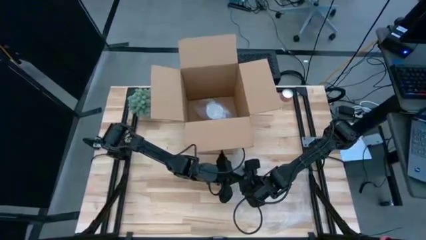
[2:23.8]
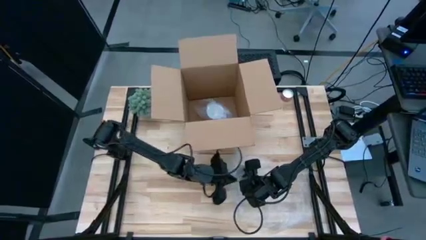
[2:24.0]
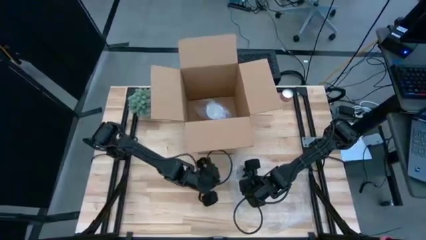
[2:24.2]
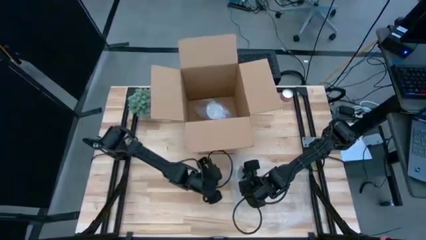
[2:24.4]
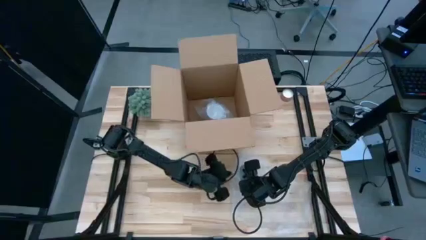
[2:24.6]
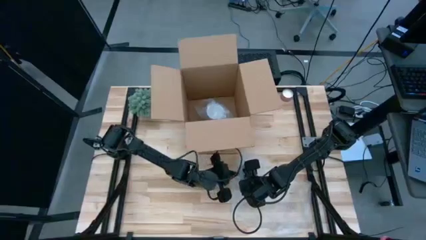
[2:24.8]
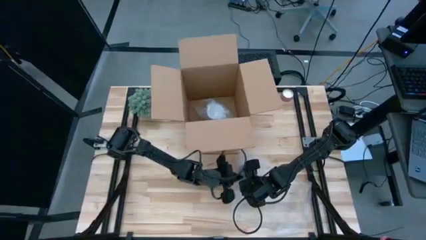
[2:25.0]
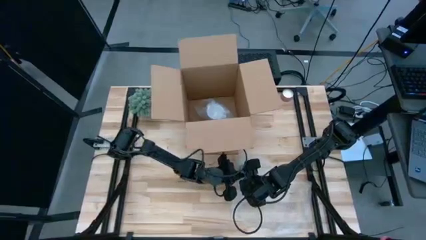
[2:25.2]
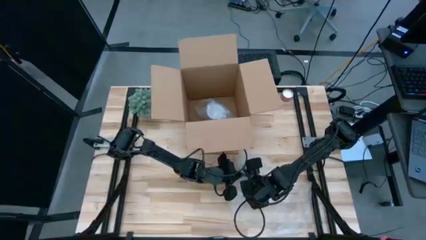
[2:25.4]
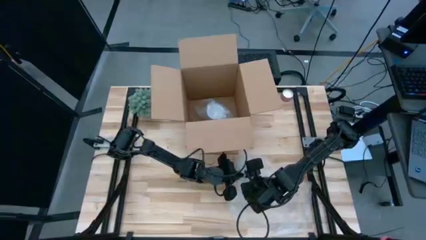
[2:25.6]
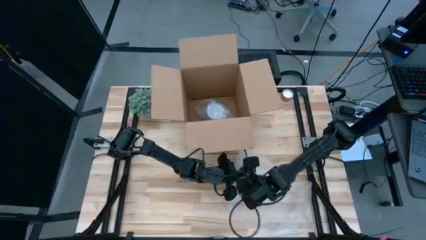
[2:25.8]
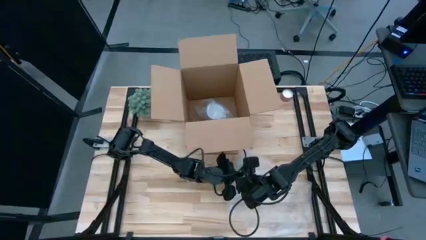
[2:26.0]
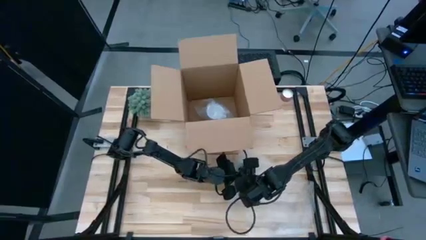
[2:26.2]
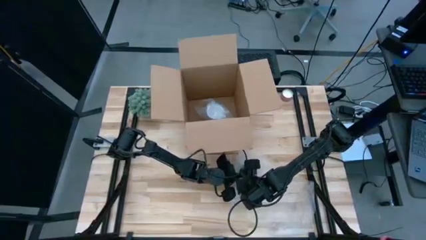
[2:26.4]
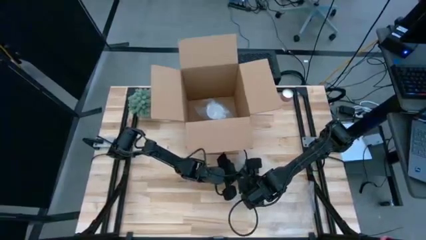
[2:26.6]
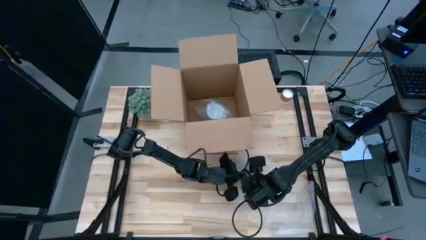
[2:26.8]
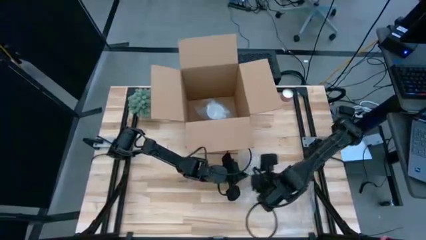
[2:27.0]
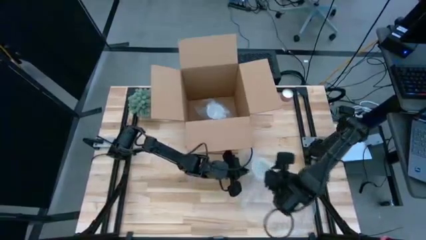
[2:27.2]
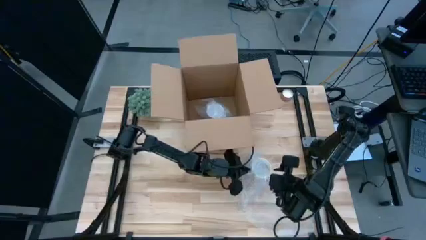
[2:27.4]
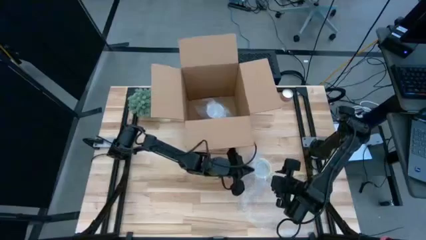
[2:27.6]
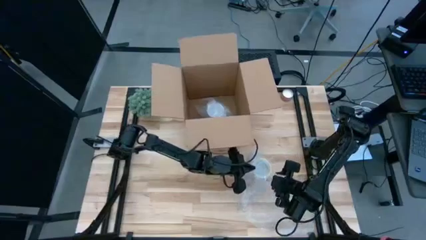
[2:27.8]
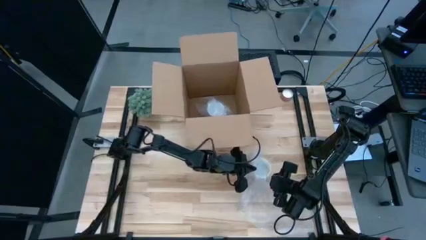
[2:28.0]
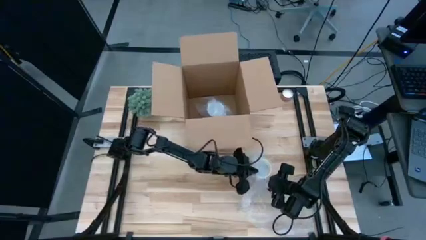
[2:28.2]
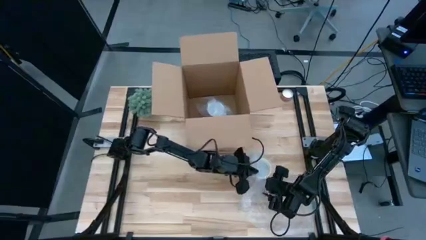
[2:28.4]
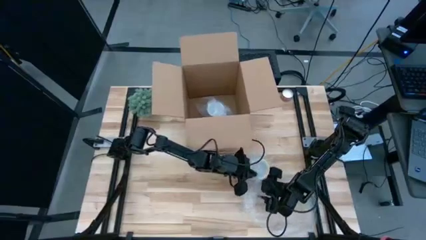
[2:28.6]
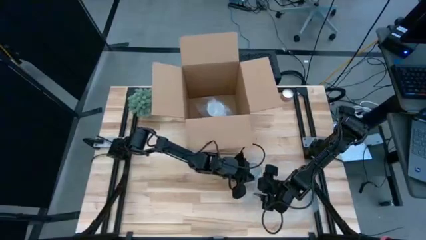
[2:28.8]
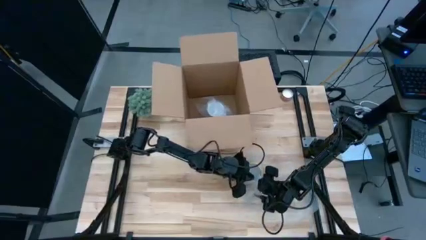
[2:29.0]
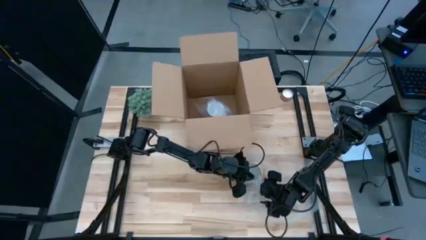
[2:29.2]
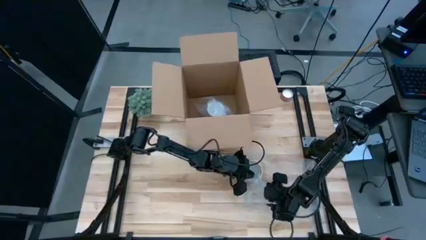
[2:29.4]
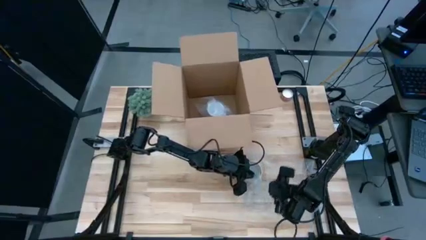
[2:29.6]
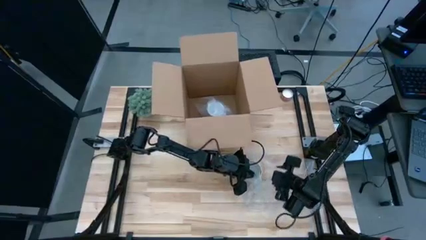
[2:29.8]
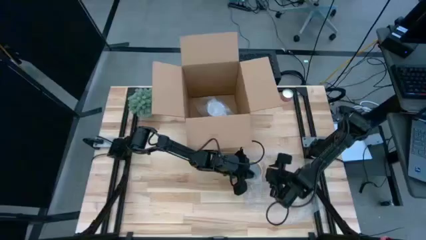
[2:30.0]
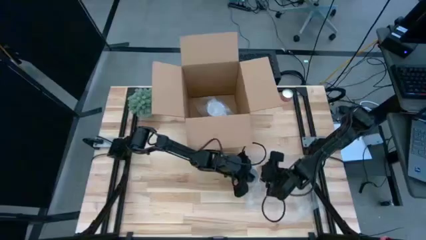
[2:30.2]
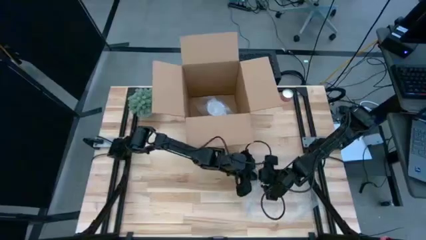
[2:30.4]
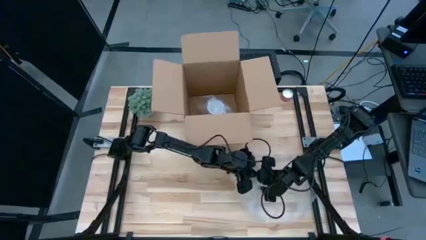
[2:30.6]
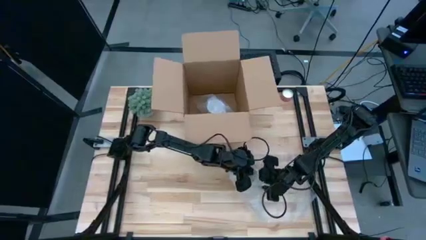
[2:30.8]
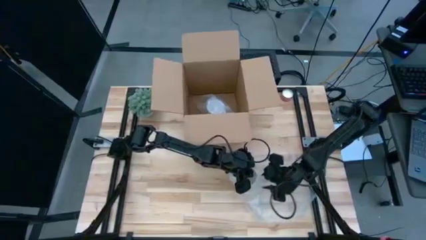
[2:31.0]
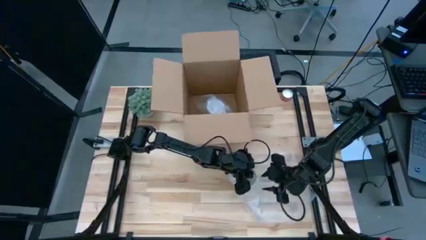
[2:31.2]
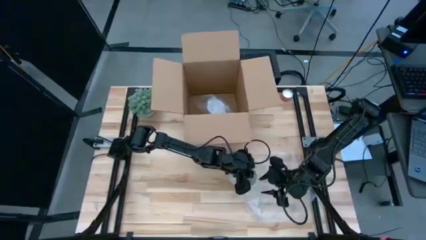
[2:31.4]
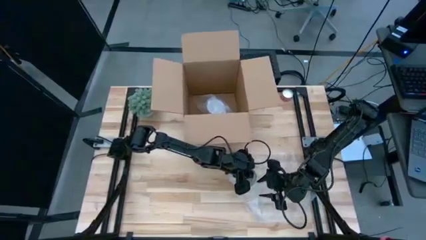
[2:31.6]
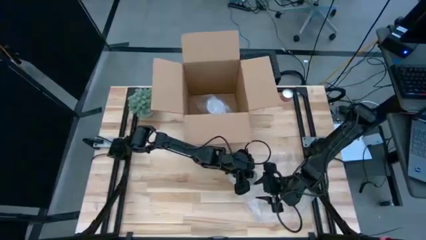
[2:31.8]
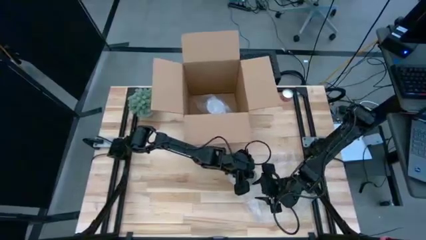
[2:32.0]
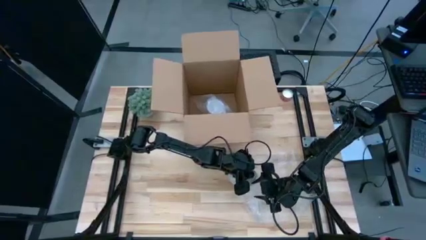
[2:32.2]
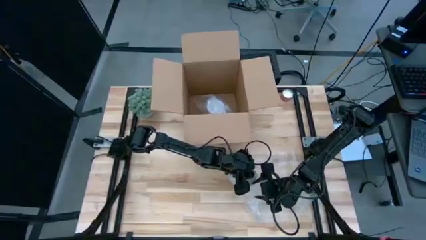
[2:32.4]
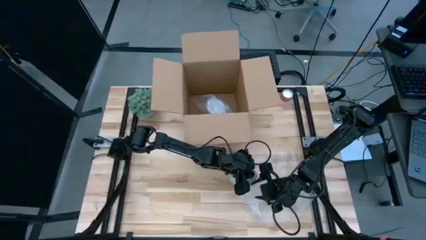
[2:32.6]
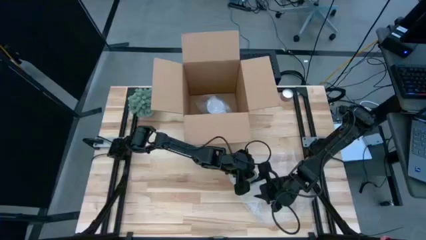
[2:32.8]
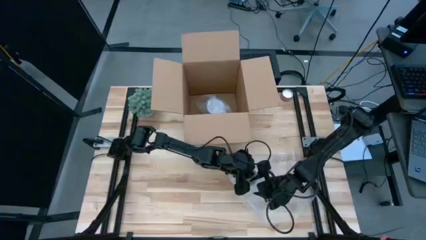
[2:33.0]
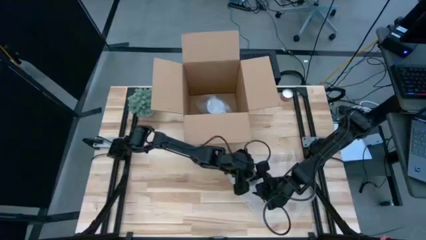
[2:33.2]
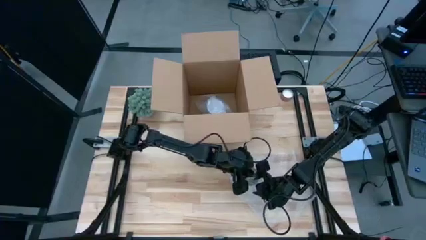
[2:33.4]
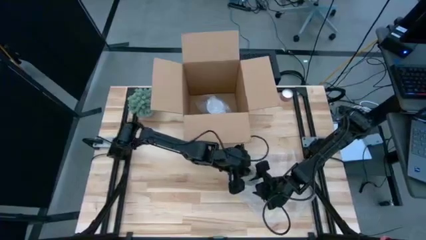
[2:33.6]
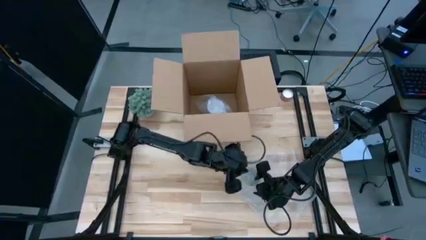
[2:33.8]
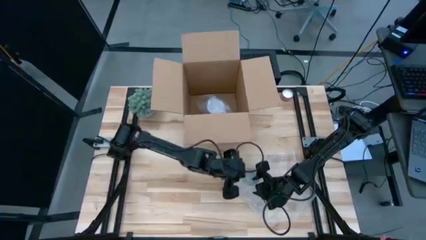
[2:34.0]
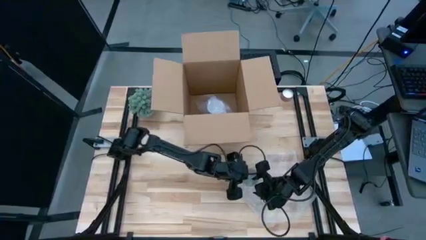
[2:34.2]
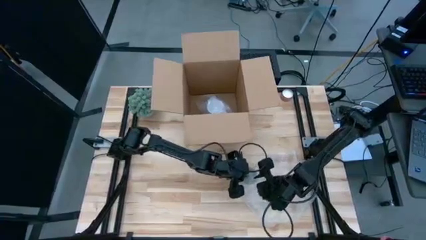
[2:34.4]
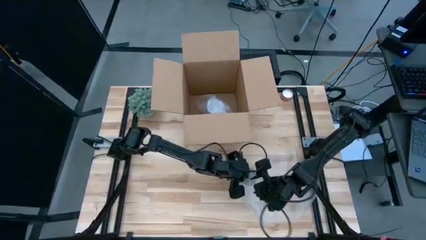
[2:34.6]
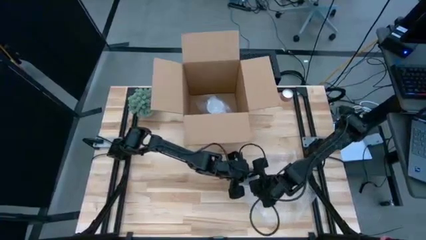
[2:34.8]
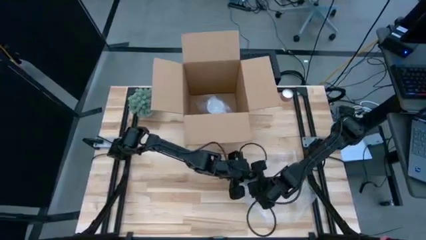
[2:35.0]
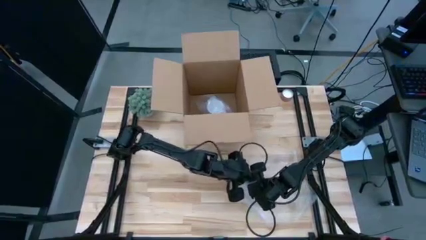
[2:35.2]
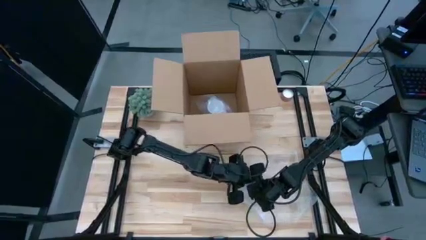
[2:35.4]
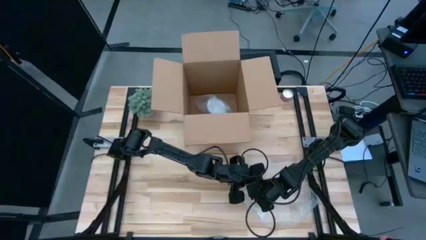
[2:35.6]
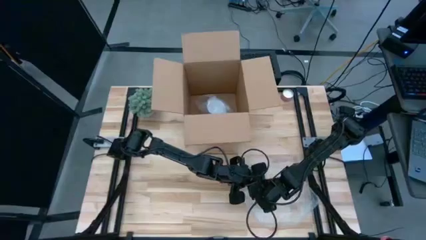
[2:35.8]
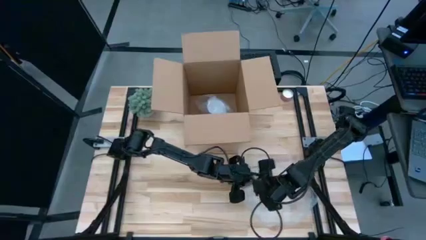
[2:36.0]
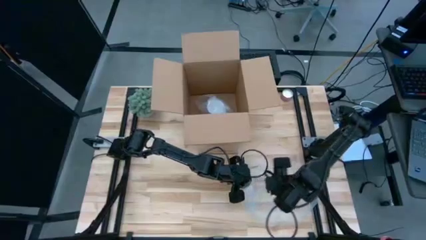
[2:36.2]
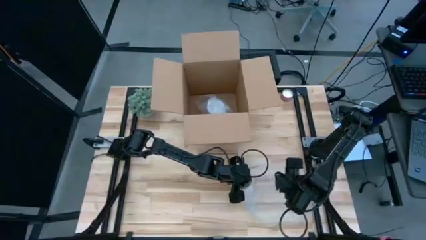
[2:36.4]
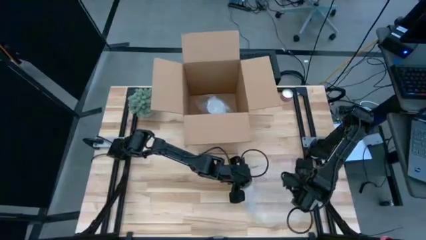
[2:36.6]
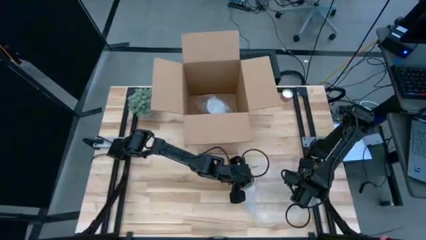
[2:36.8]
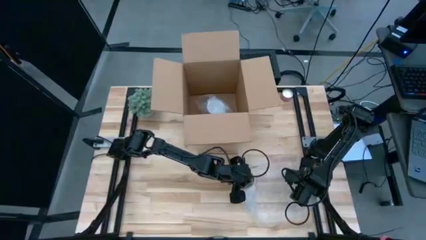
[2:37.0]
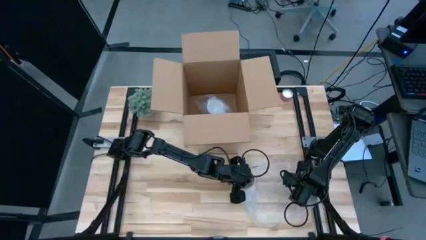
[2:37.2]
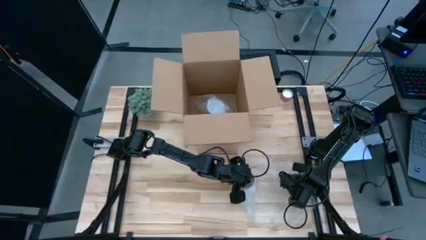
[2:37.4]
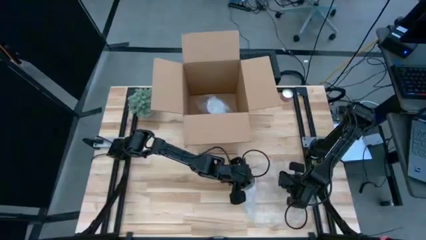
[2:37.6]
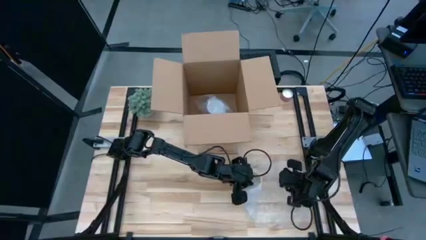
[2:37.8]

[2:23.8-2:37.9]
Task: wrap mug
Wrap the orange mug in the bubble wrap
